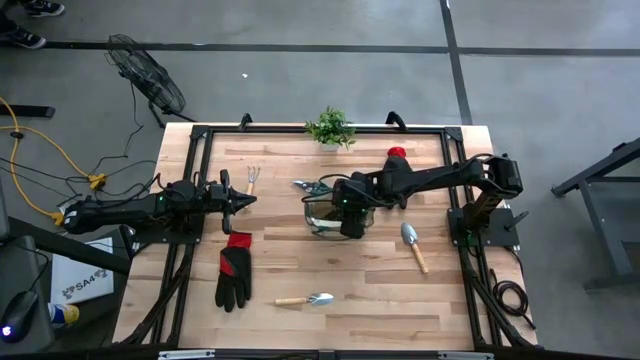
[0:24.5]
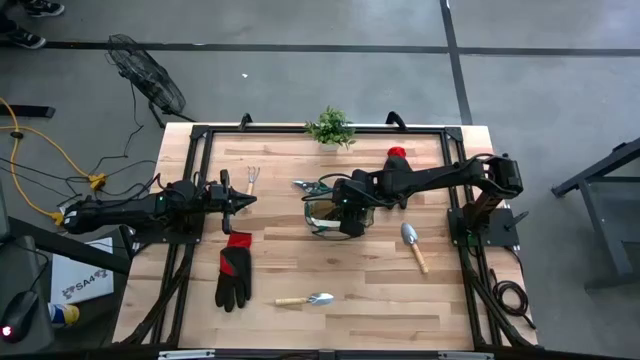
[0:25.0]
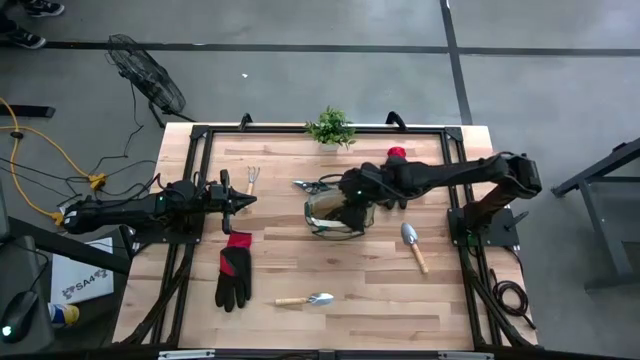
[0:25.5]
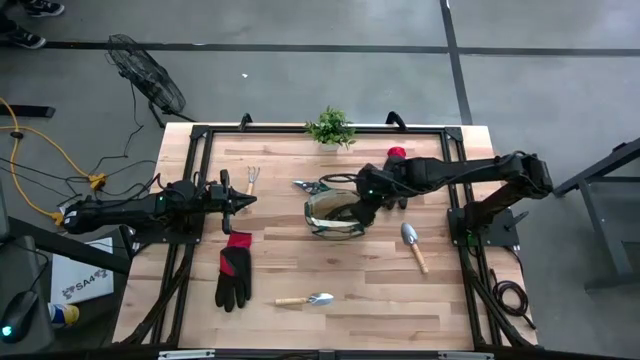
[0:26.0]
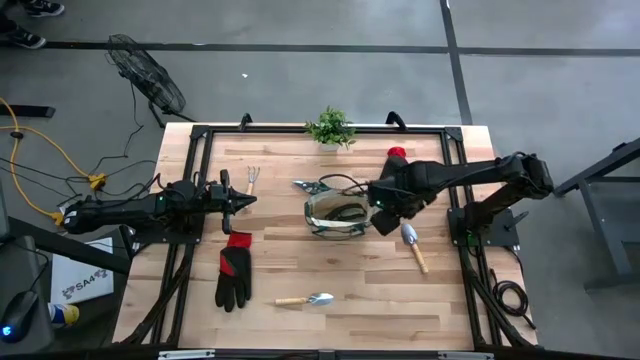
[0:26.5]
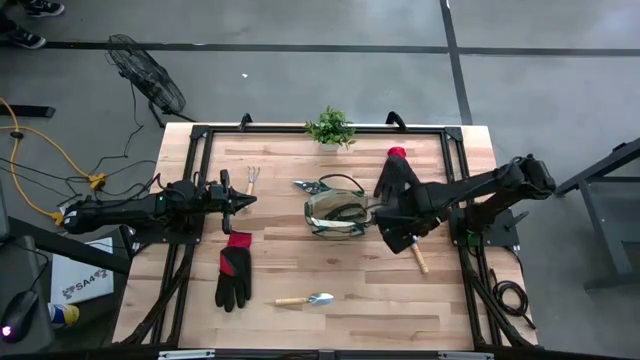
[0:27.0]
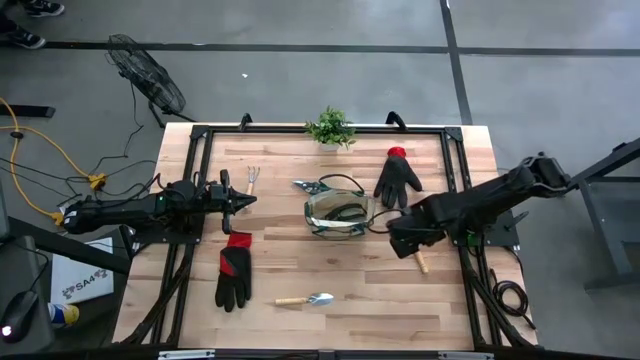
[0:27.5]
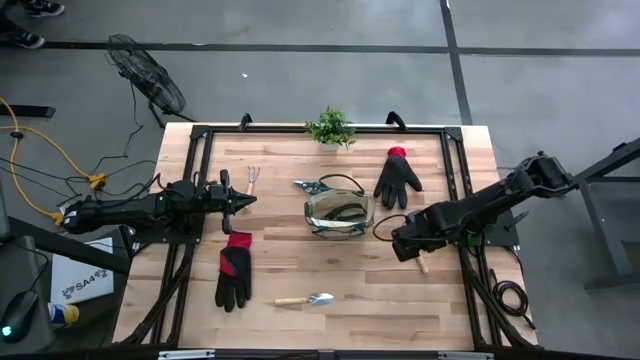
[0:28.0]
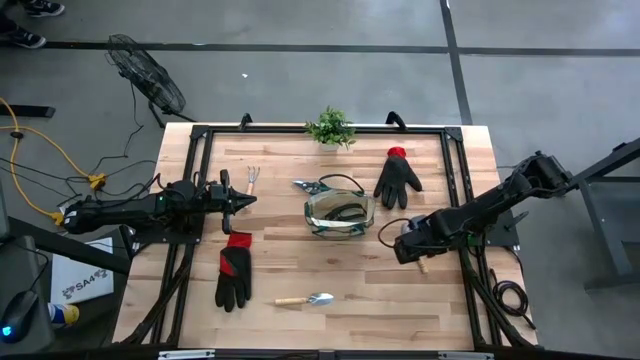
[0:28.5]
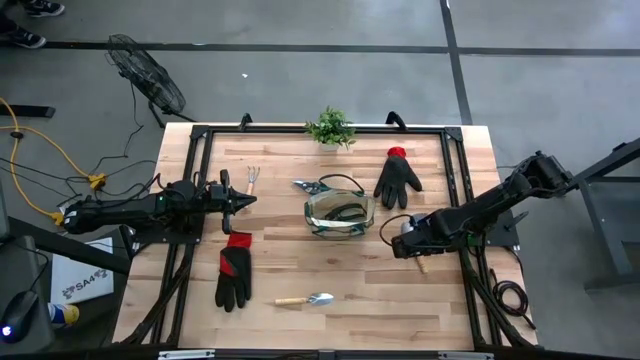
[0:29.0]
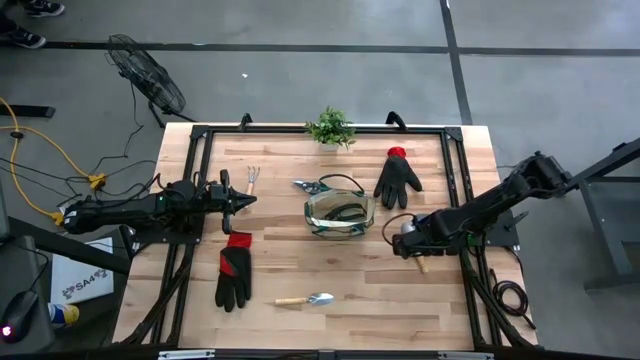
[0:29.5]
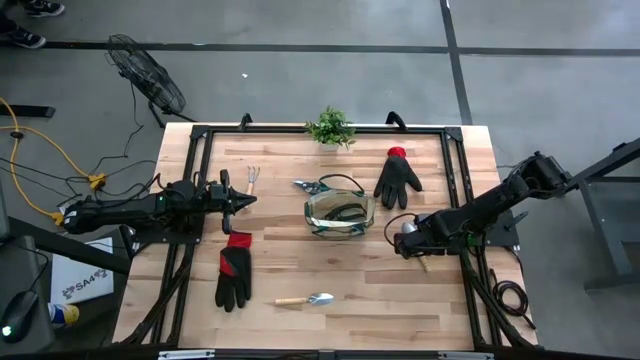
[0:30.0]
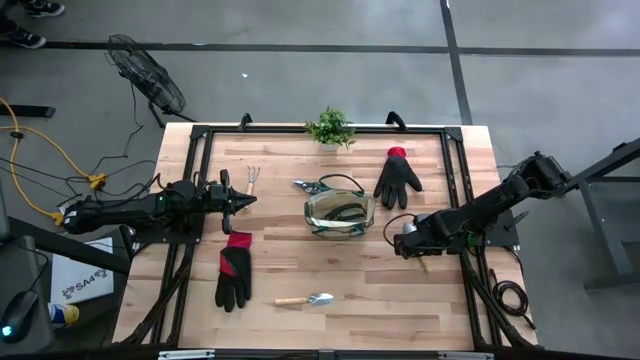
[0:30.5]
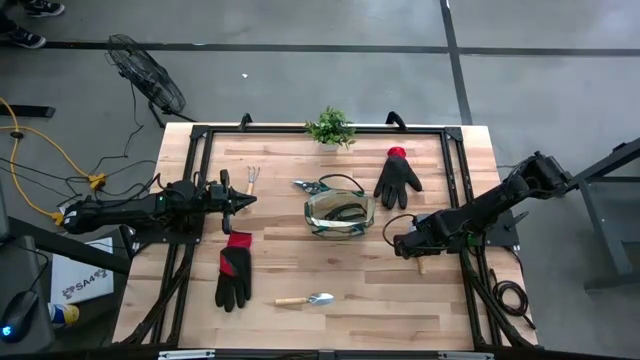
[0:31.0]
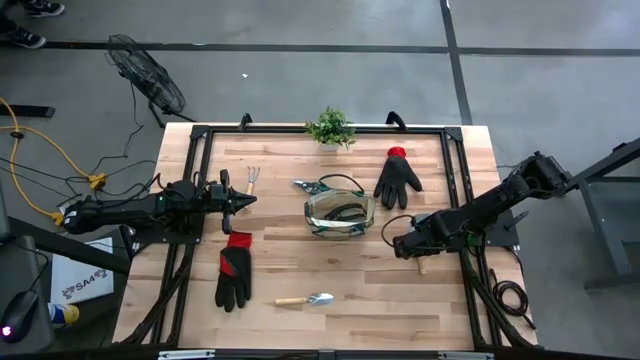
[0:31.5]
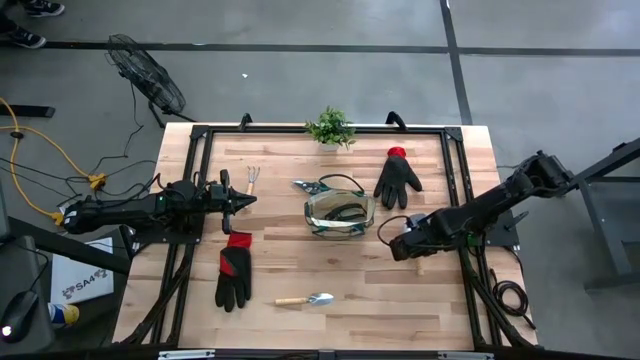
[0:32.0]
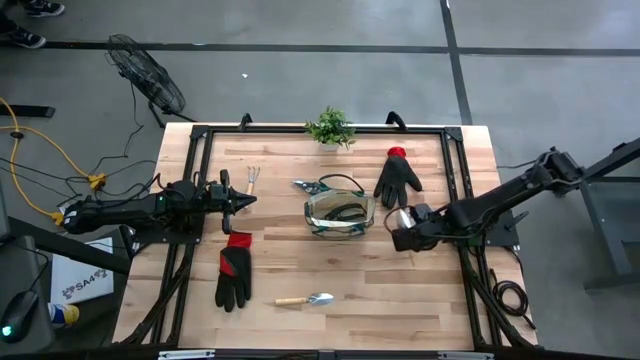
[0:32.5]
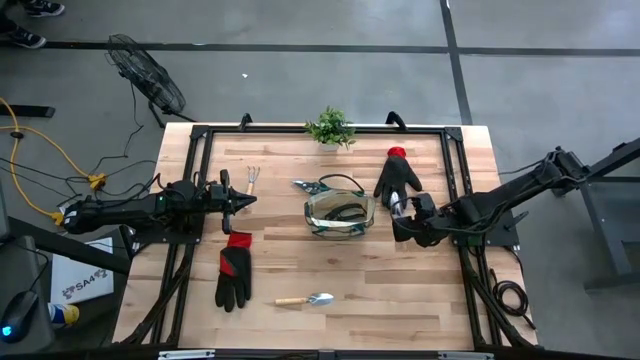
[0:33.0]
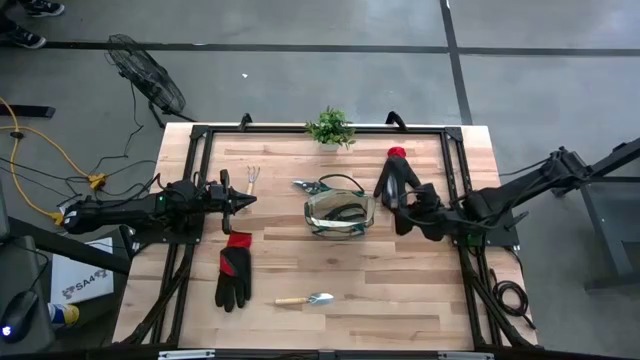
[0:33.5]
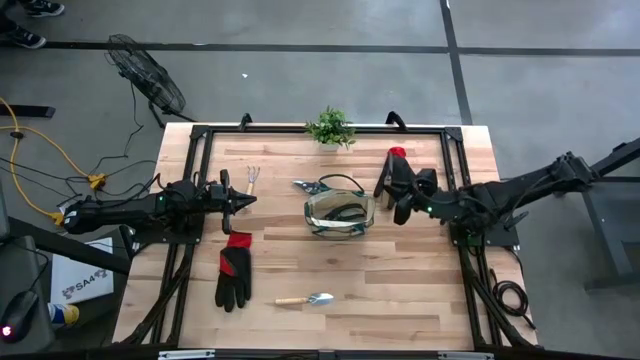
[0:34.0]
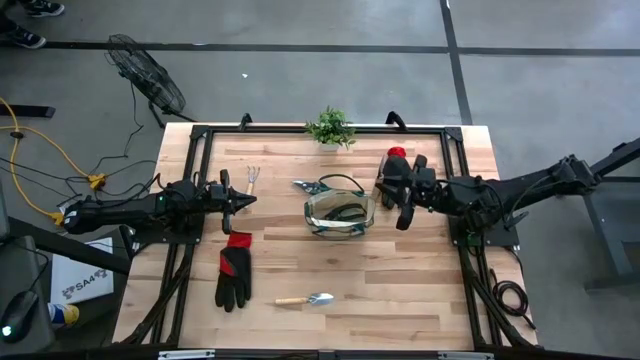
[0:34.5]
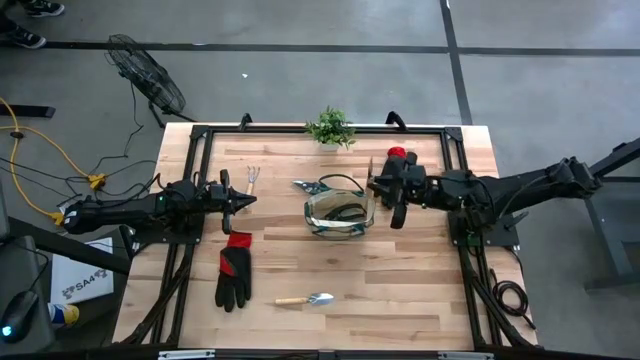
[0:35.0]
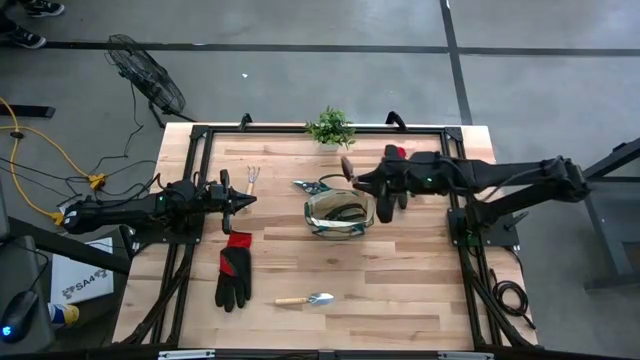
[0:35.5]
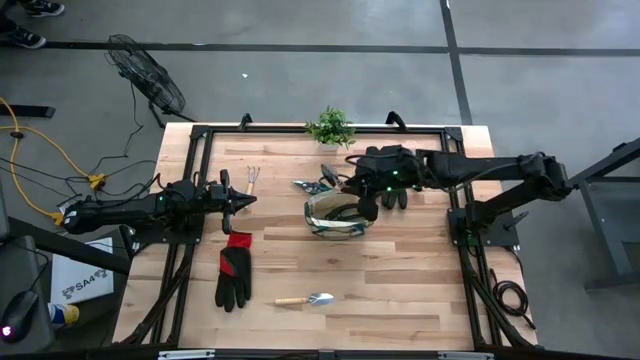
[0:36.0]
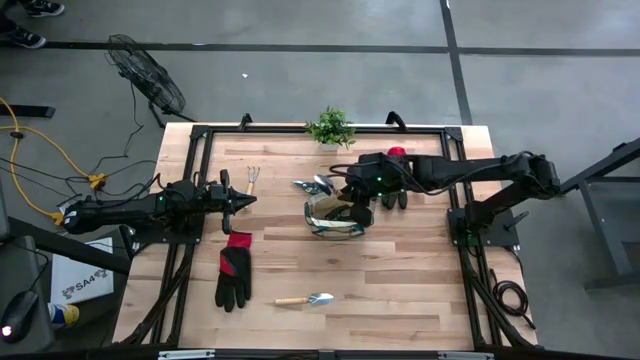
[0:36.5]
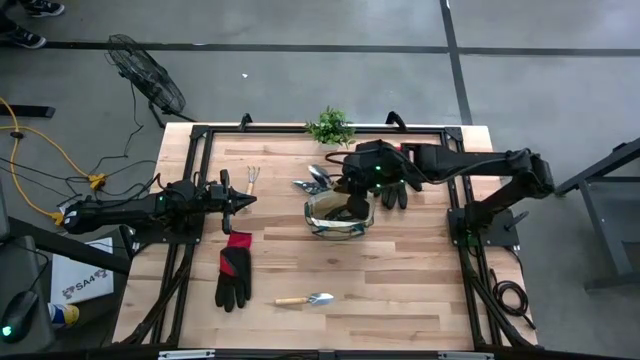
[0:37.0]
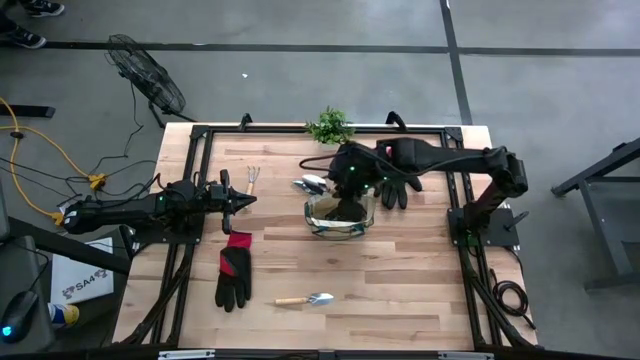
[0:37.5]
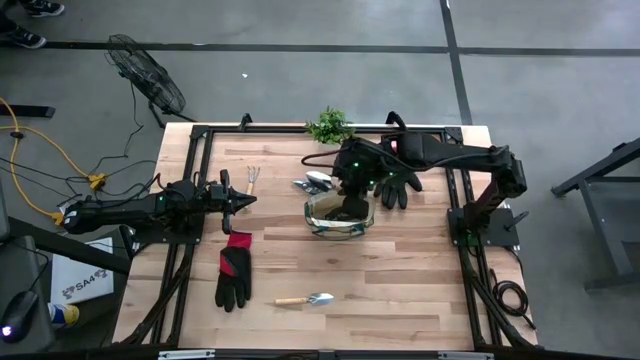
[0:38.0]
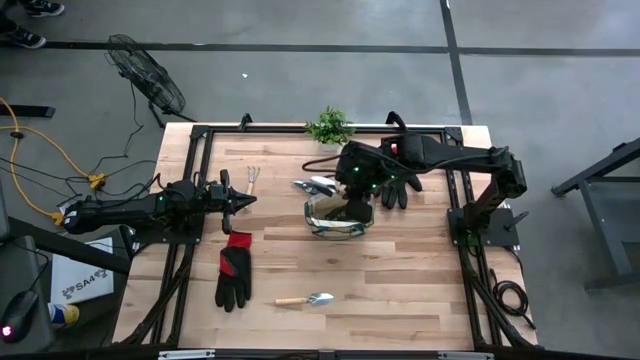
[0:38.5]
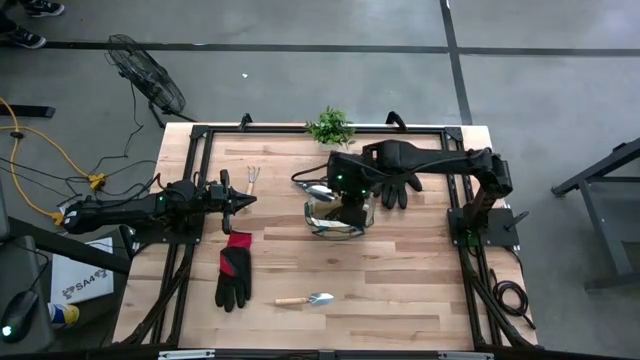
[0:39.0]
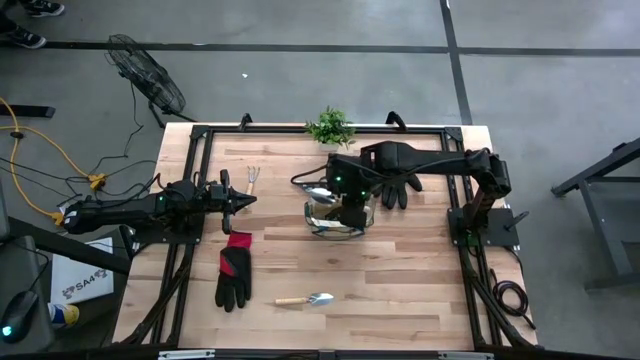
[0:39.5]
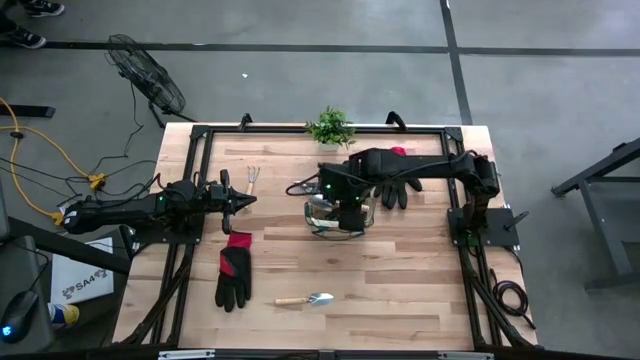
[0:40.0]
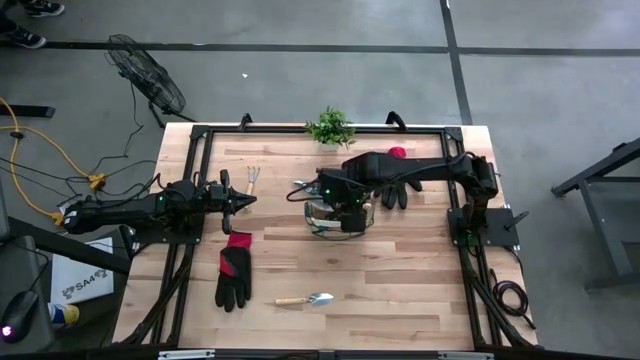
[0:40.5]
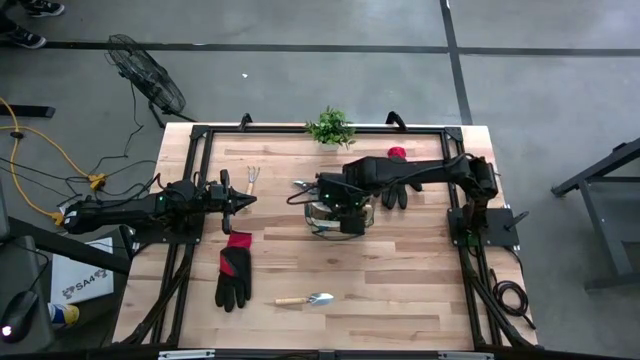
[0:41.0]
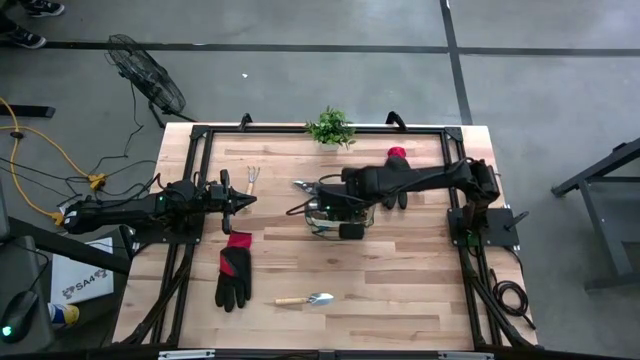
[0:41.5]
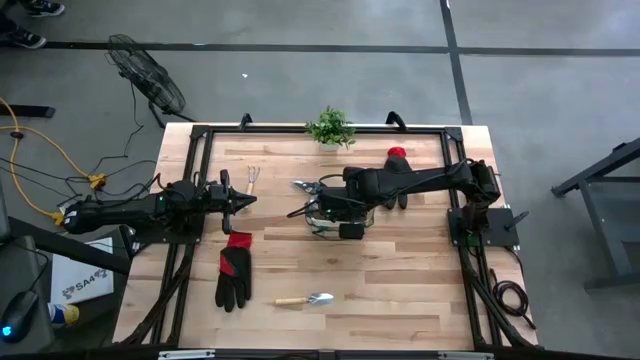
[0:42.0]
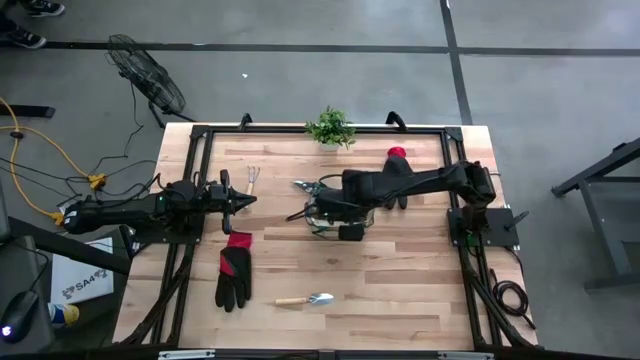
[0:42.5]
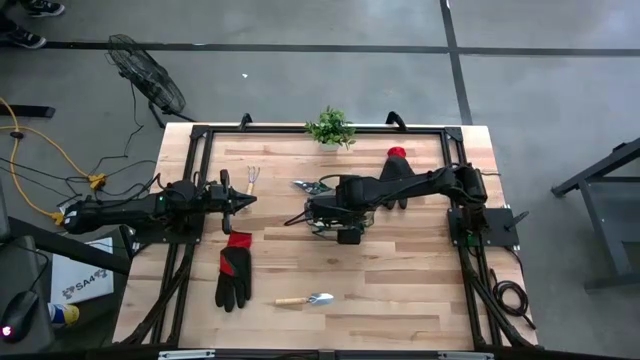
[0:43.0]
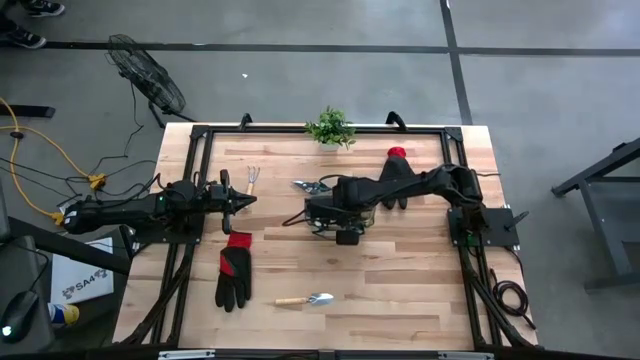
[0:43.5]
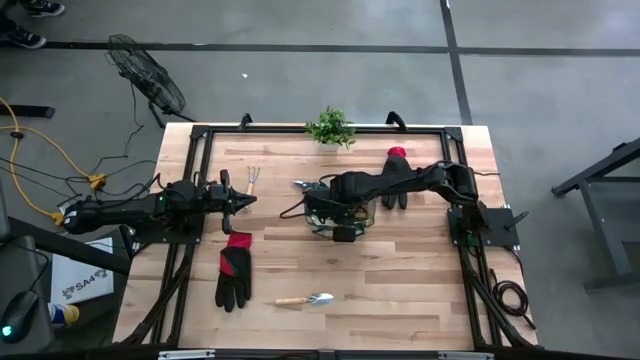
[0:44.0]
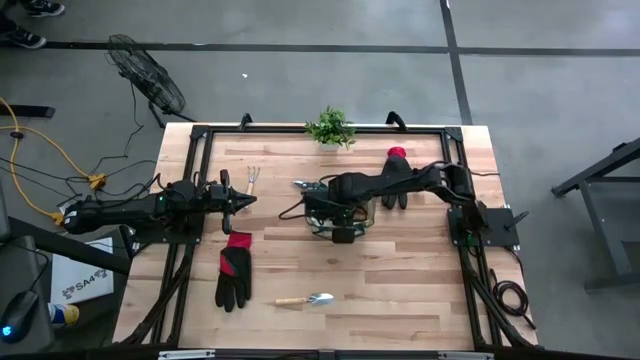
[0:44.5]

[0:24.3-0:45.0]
Task: Pick & Place Garden tools in Gardening bag
Put the brown trowel into the gardening bag

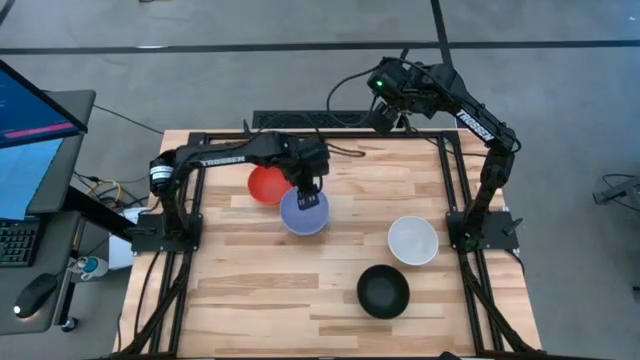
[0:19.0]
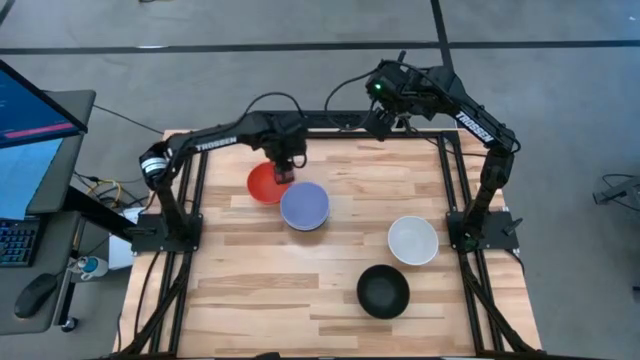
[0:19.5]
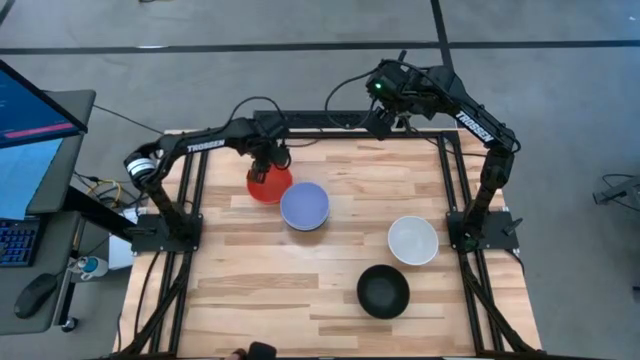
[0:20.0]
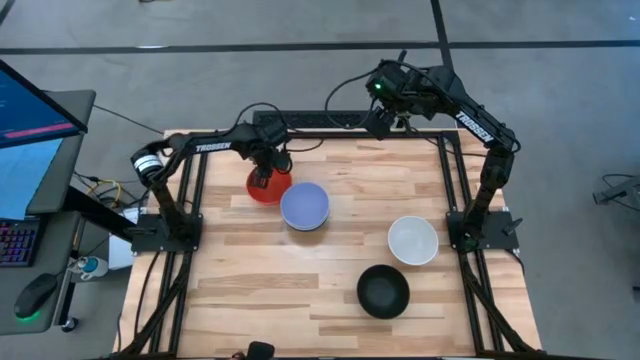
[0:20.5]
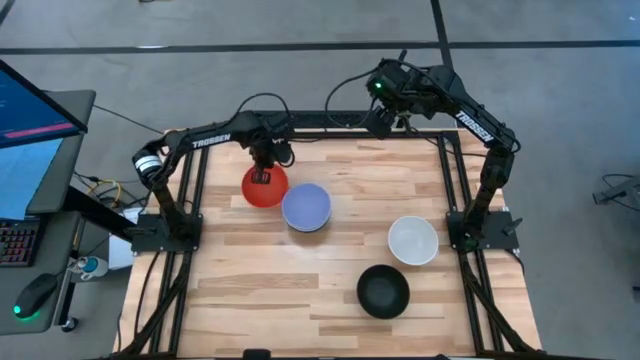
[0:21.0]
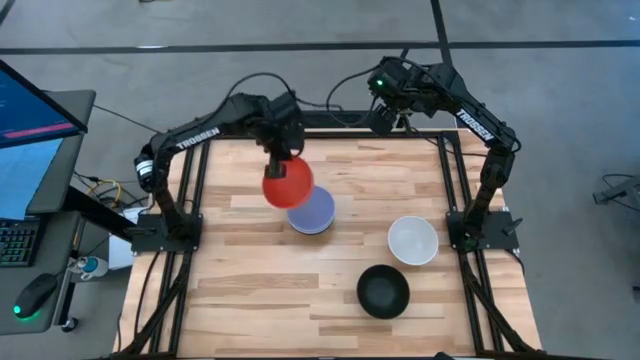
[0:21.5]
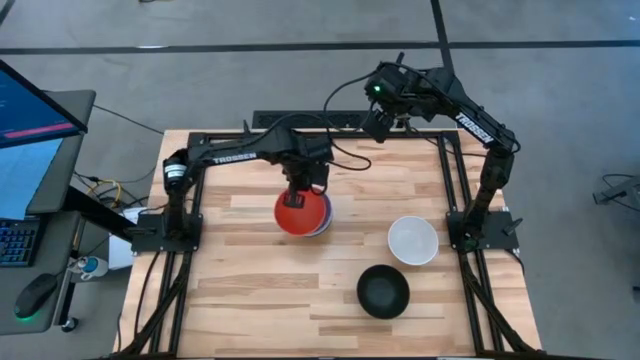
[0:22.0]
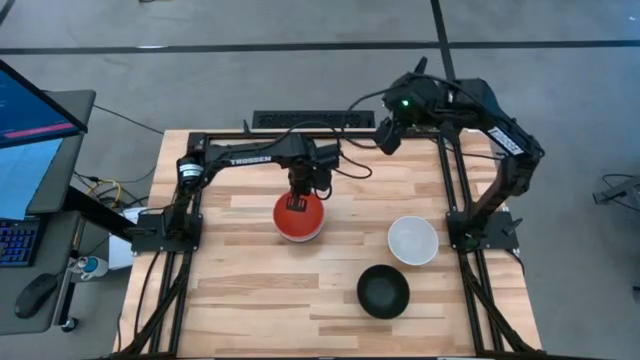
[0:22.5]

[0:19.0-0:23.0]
Task: Nest bowls inside each other
Stack the orange bowl on the purple bowl
